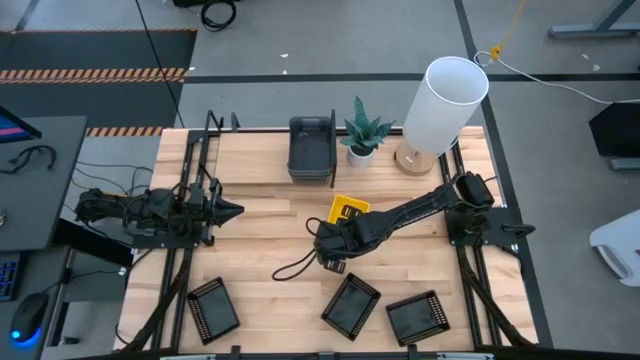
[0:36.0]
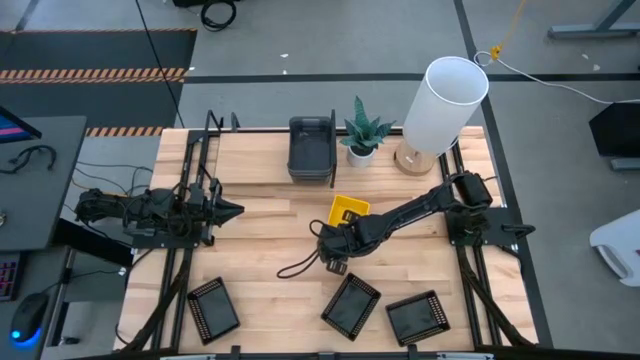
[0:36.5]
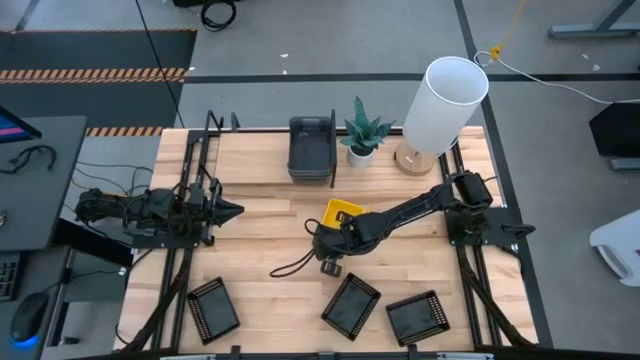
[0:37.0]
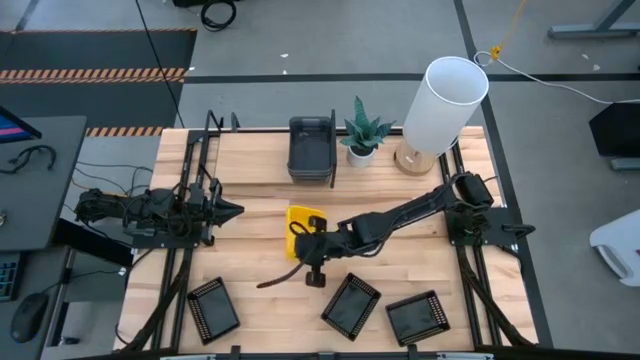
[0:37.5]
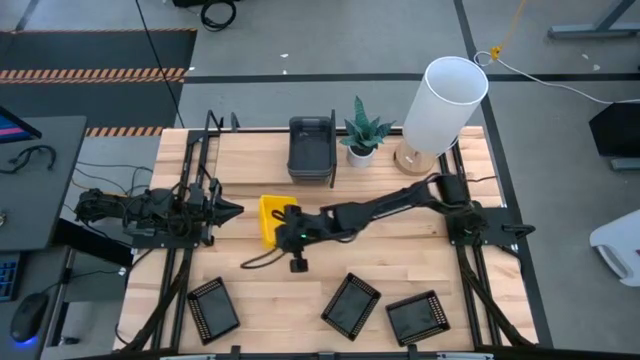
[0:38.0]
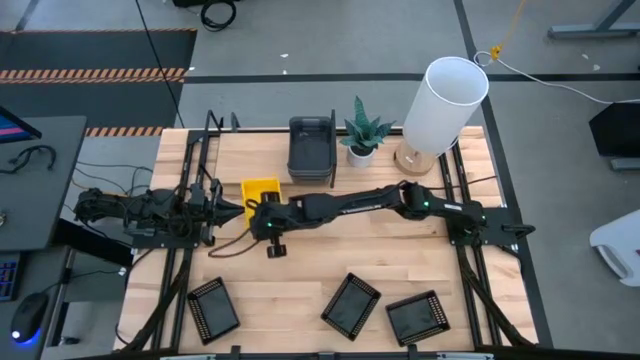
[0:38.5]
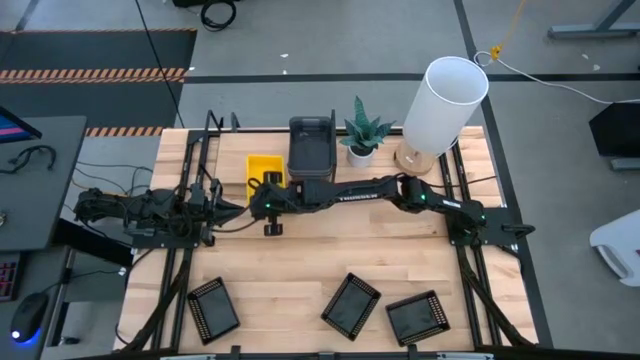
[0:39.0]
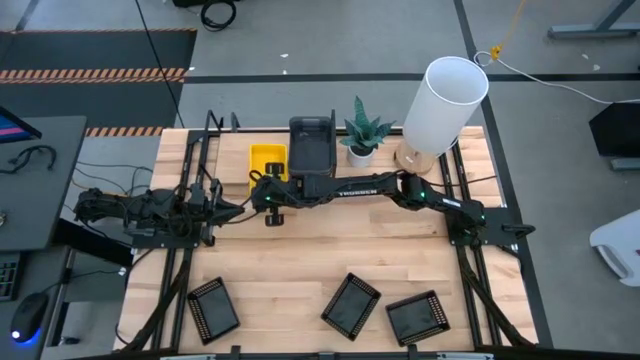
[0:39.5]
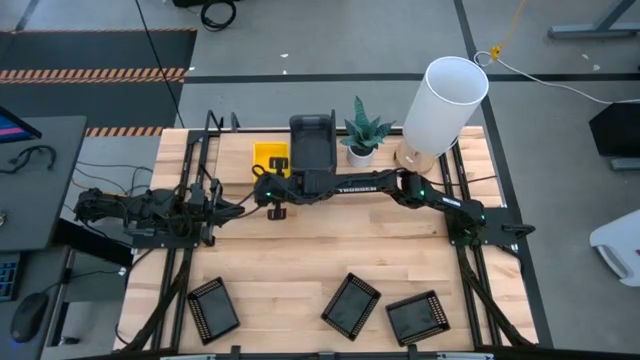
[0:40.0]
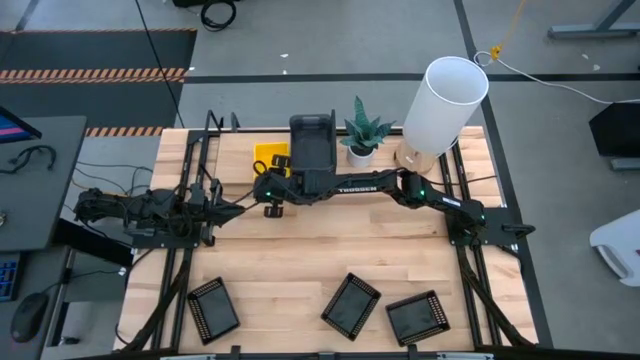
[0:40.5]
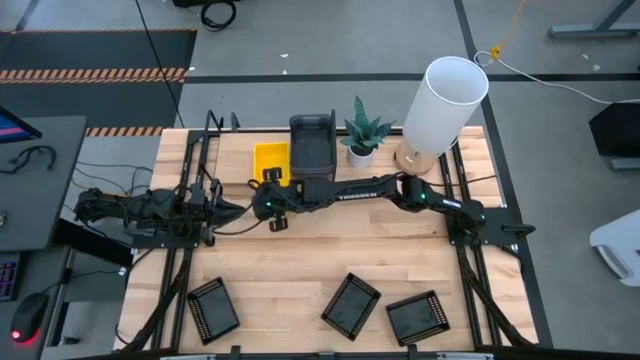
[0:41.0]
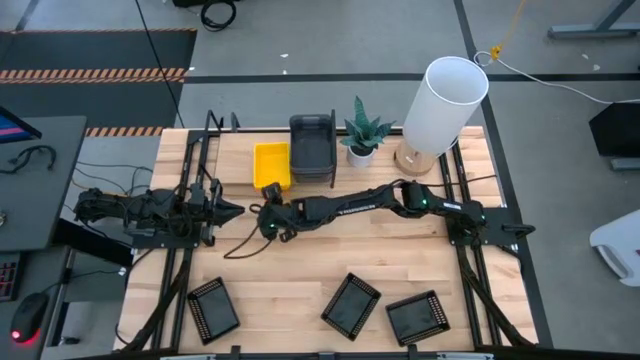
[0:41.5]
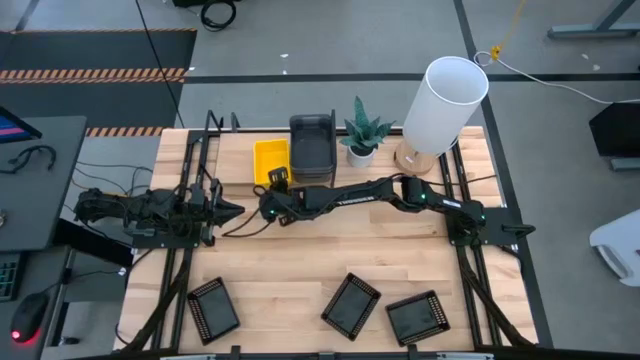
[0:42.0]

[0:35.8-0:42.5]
Task: Stack baskets on shelf by color
Put the stacked yellow bins on the shelf

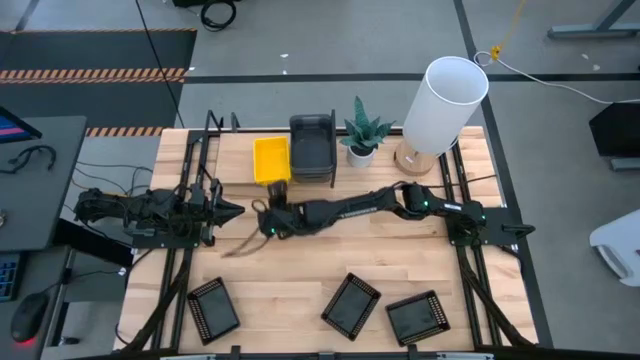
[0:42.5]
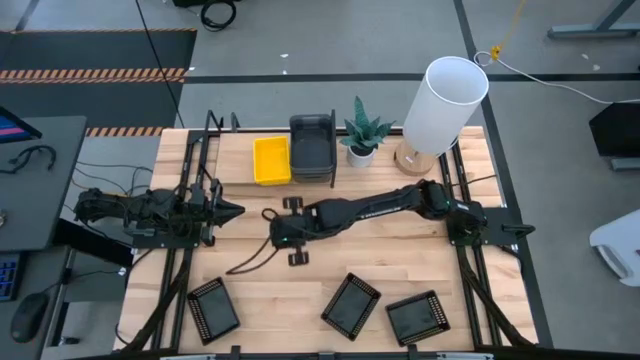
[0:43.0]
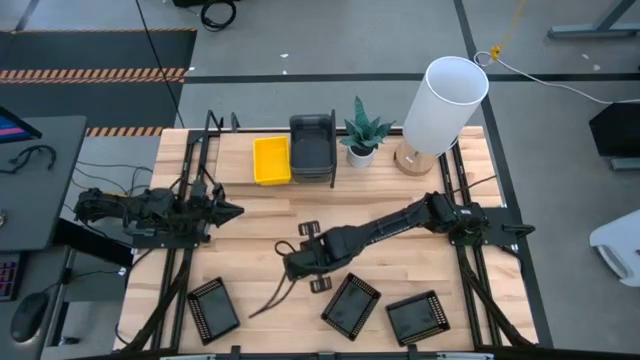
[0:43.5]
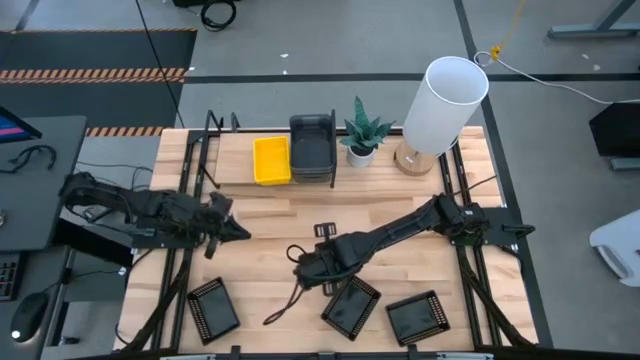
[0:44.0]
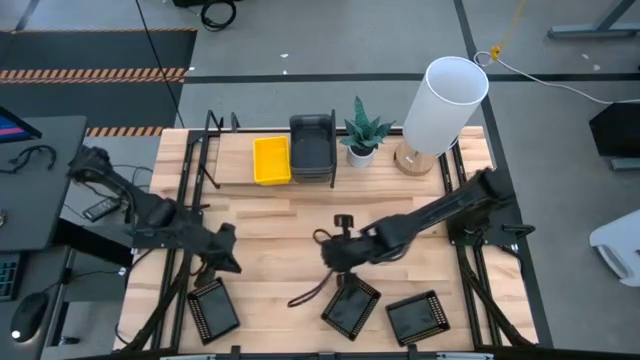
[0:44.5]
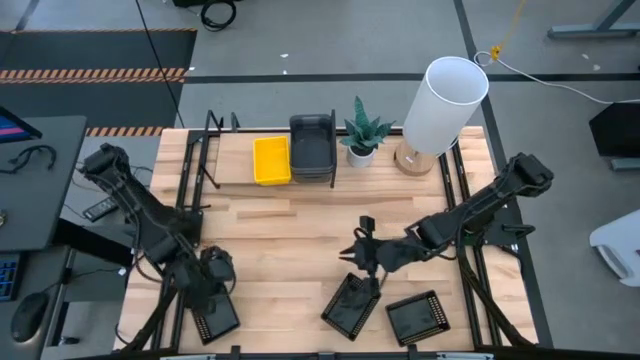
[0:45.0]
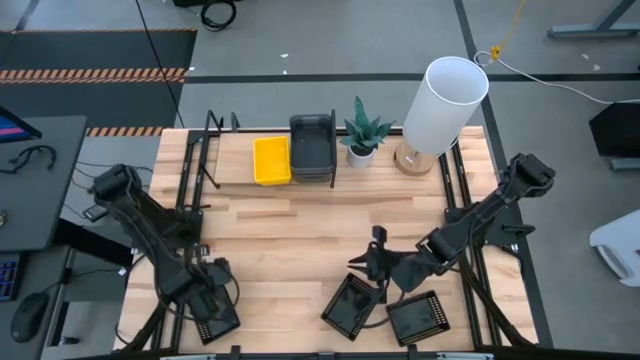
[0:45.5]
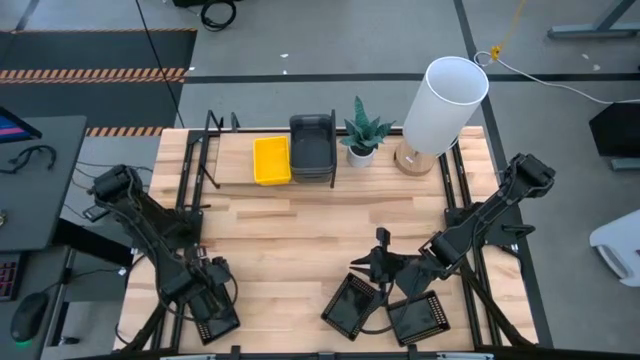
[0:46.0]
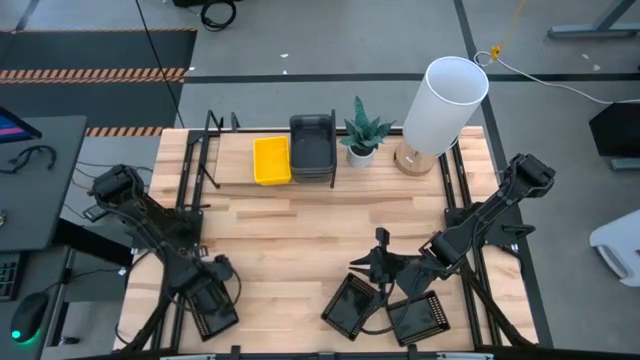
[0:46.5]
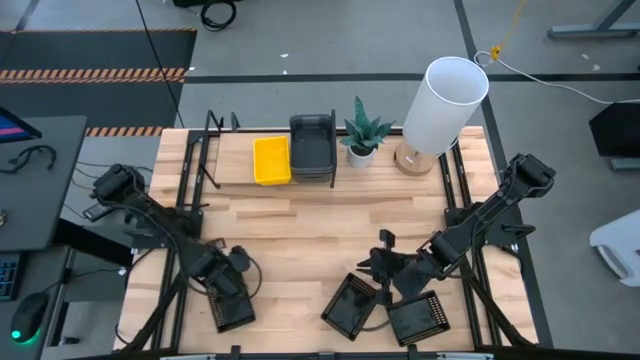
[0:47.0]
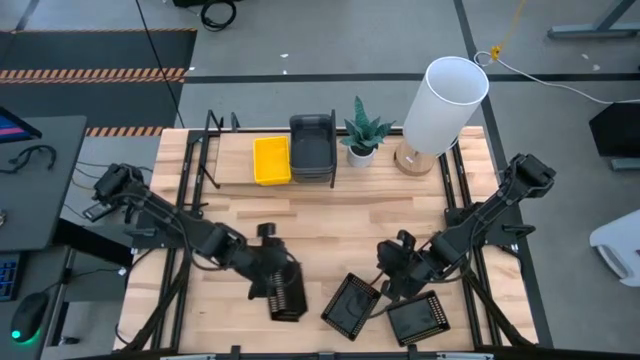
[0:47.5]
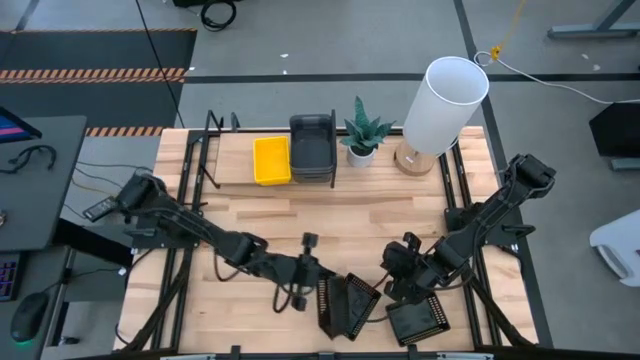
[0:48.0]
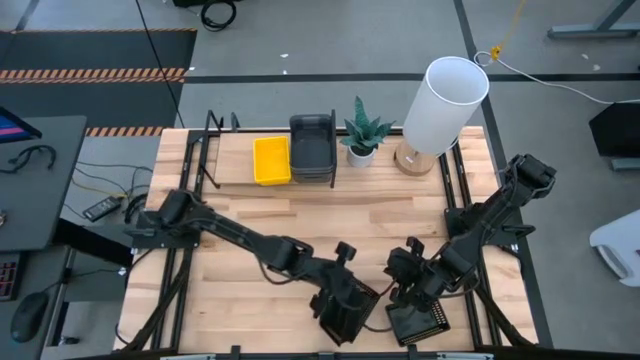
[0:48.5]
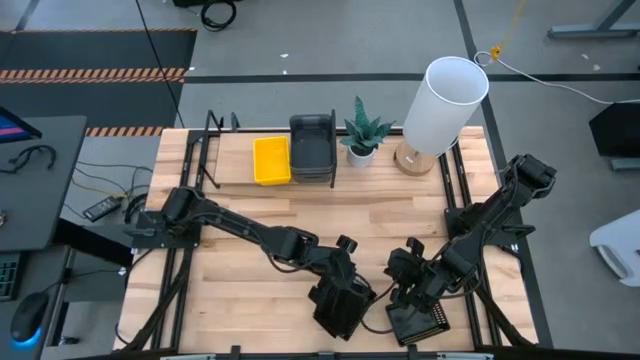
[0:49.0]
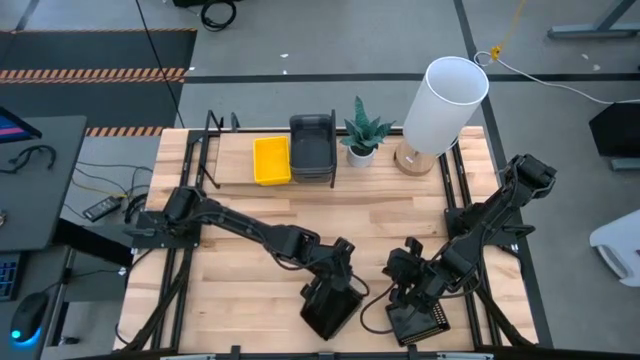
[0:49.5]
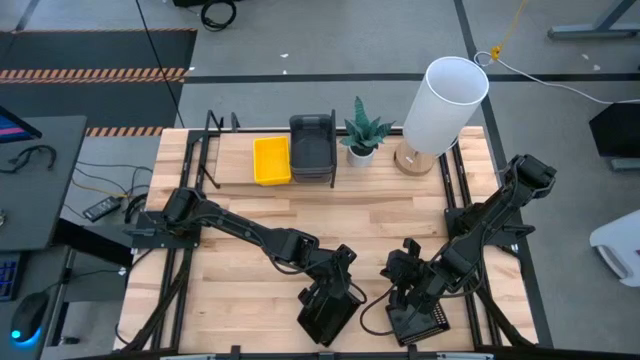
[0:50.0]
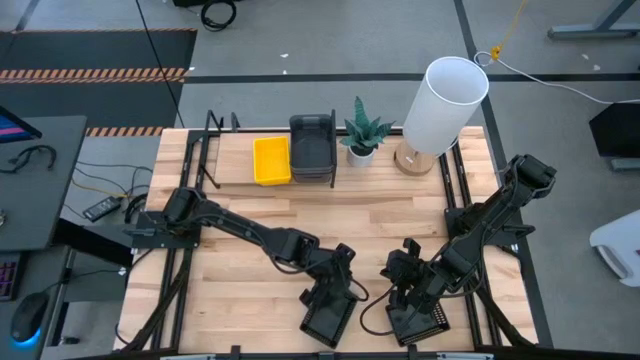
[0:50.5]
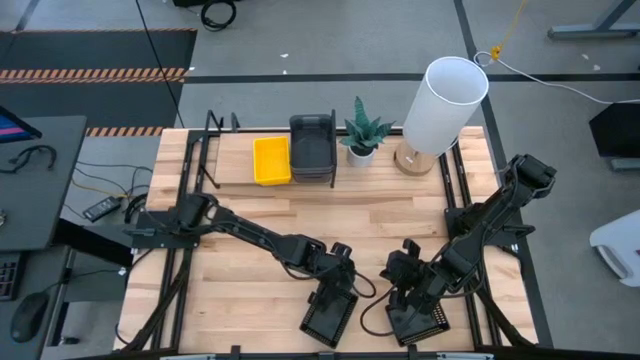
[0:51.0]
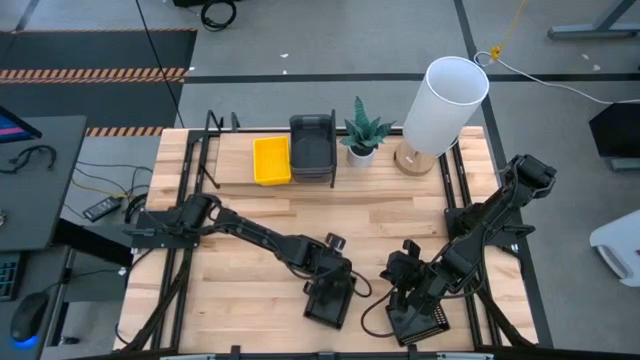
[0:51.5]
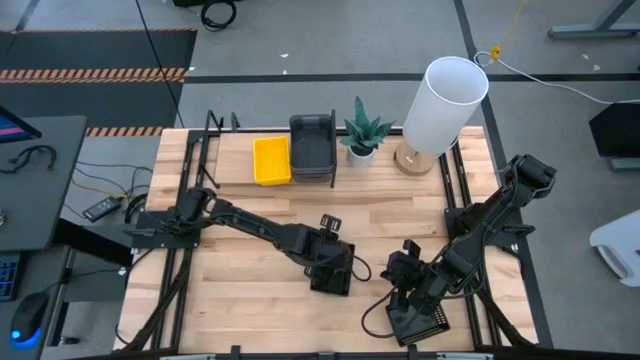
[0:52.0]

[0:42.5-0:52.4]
Stack the left black bin into the middle black bin

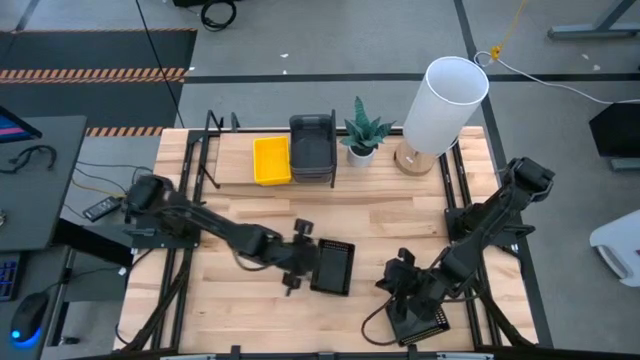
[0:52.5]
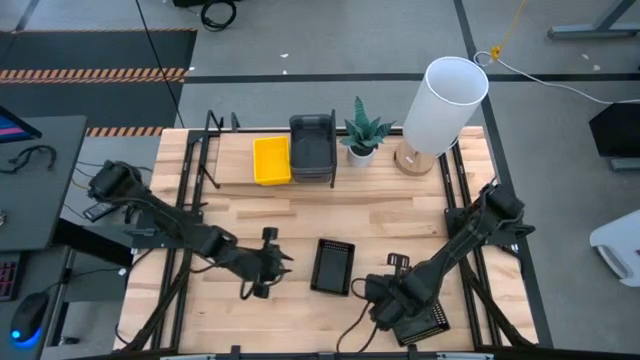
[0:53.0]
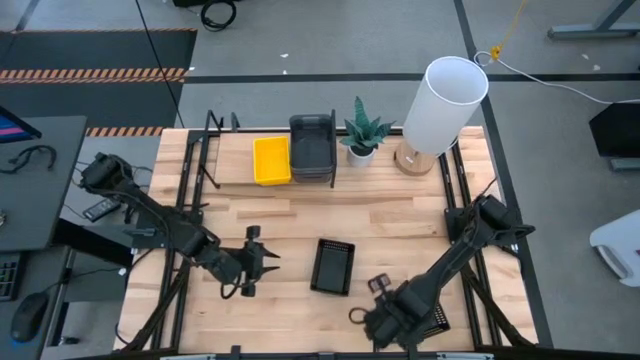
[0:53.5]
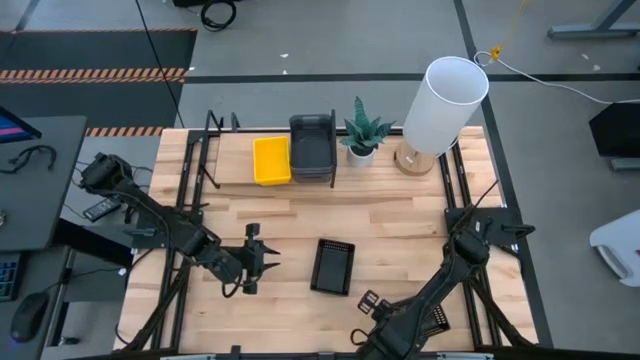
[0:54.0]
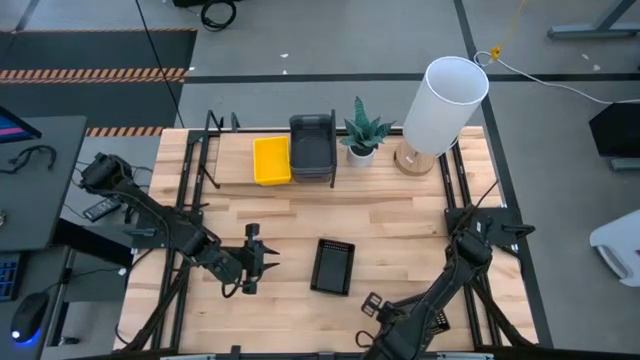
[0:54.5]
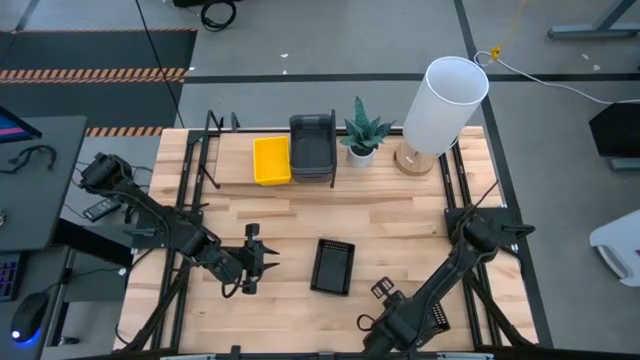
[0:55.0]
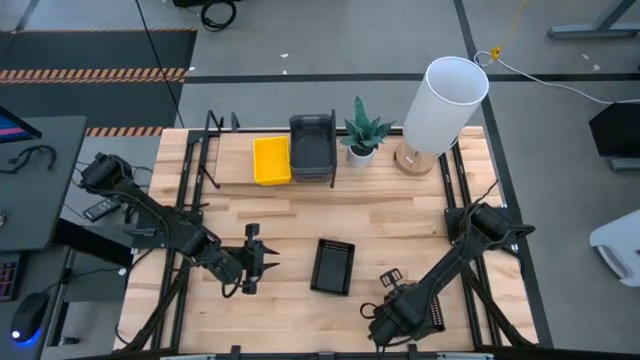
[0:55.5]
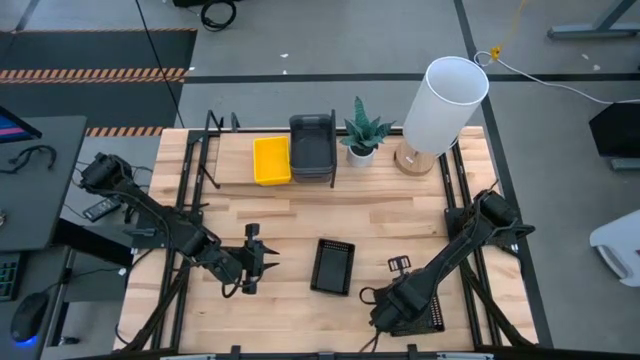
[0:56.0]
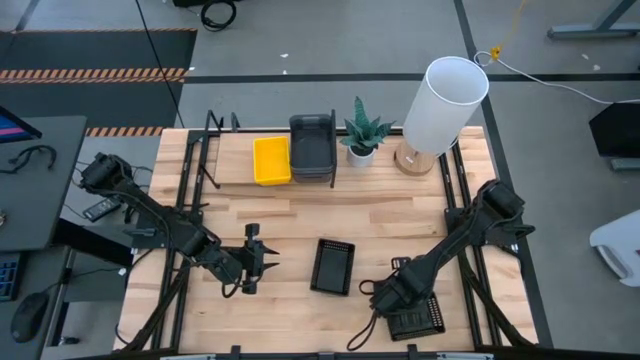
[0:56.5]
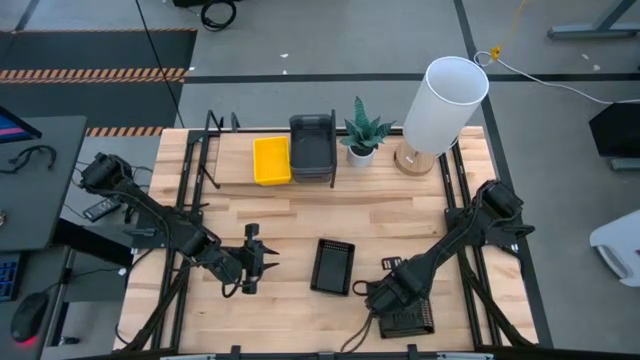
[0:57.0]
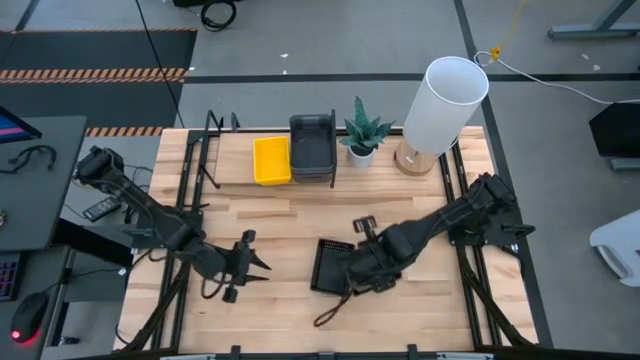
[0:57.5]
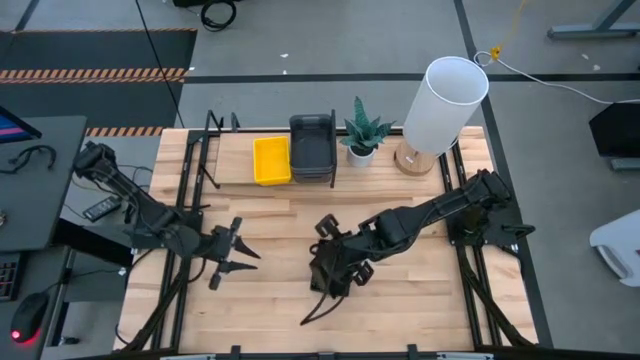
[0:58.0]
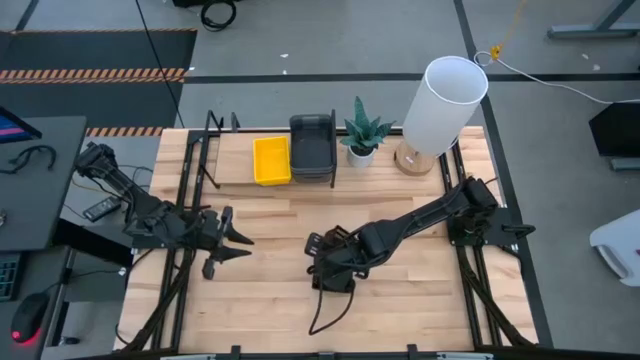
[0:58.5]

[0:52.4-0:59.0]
Stack the bottom black bin into the other black bins
